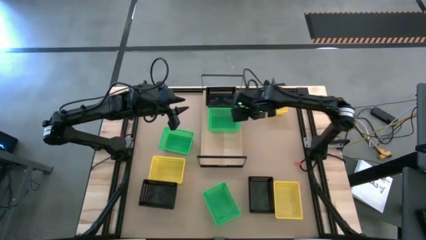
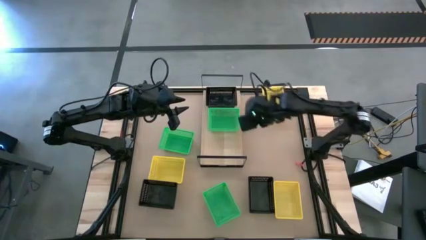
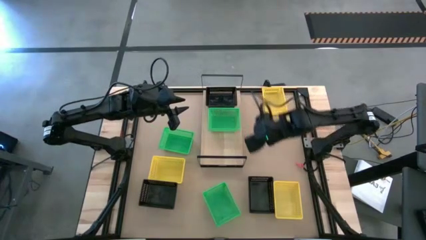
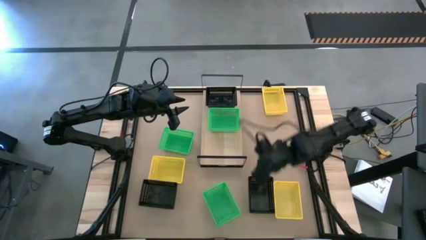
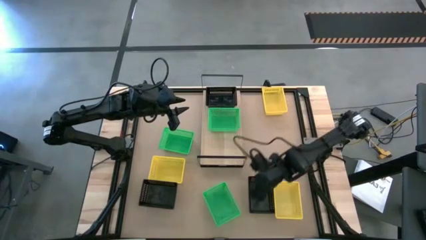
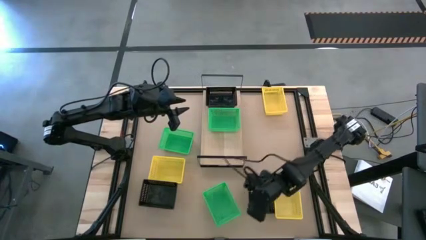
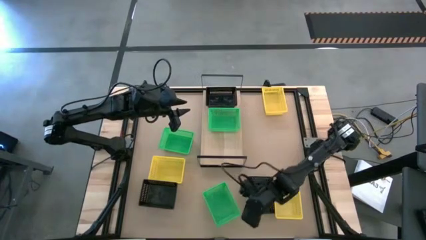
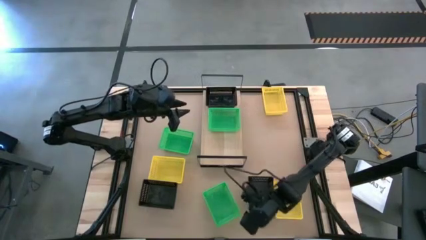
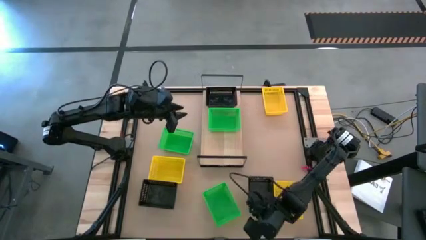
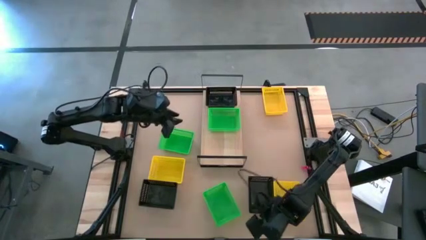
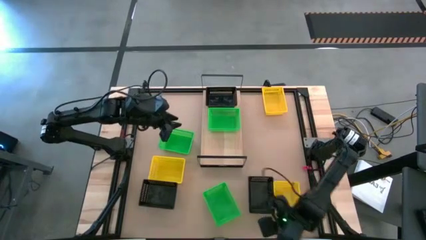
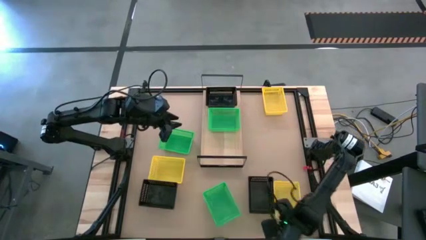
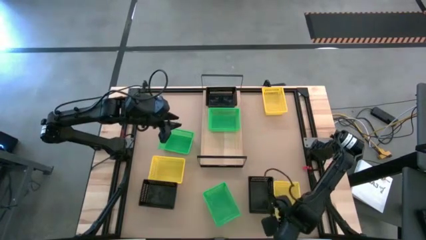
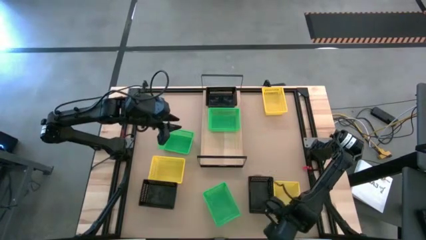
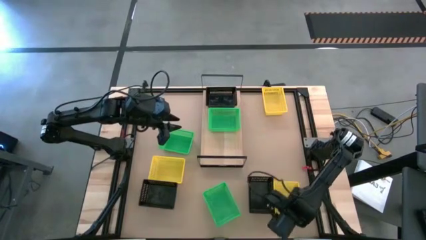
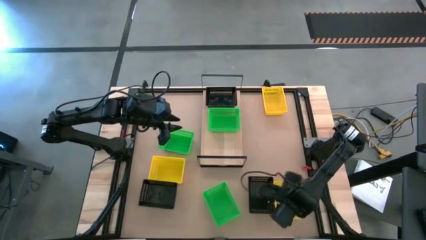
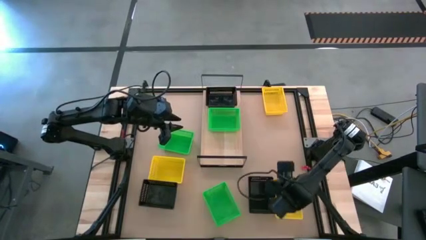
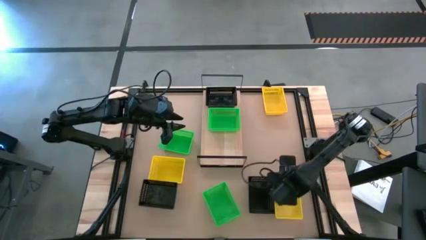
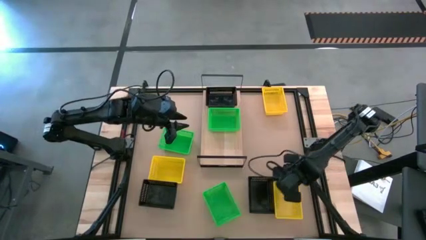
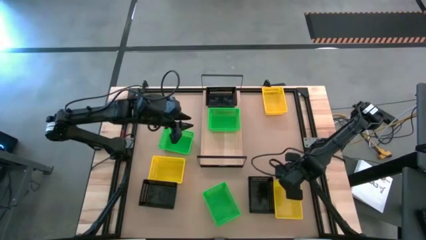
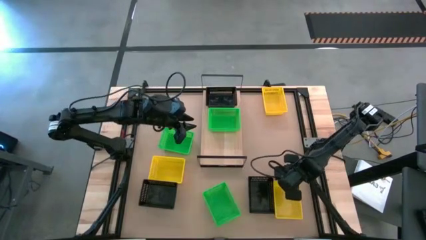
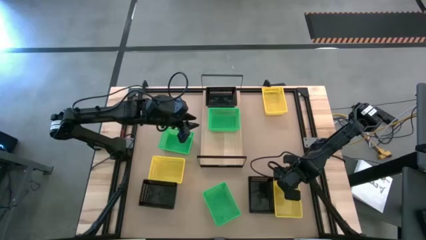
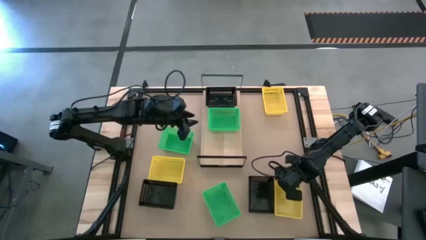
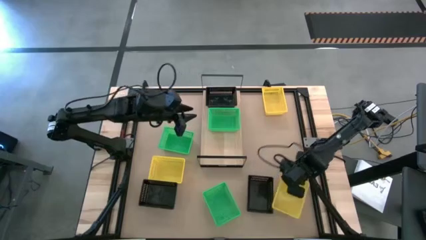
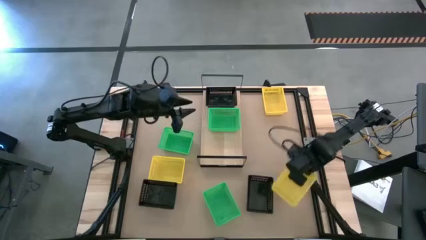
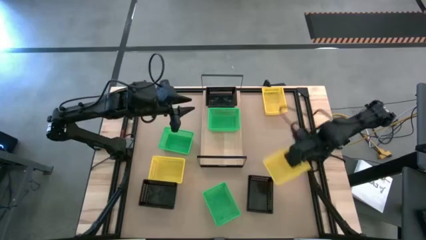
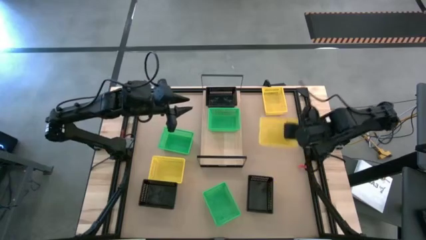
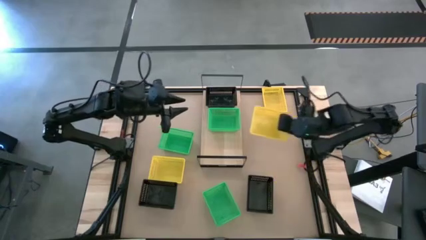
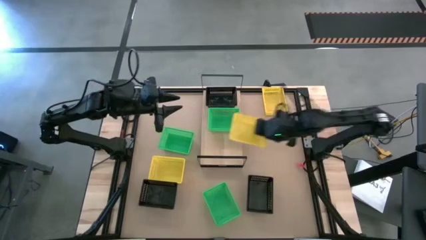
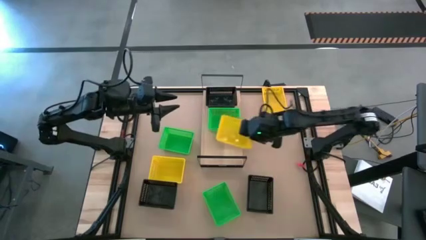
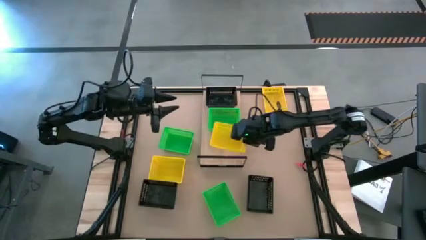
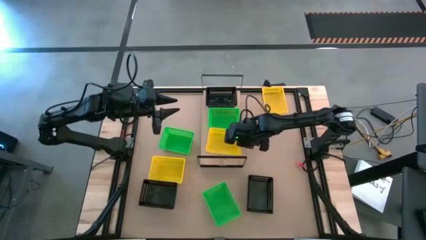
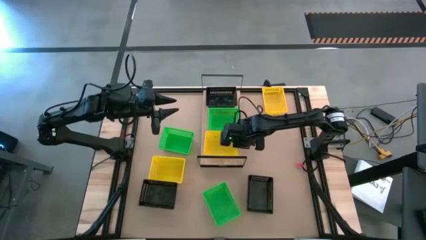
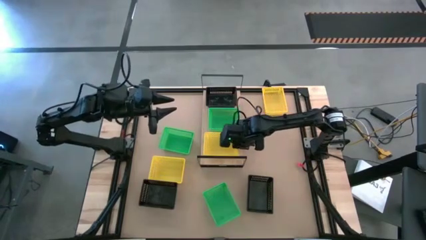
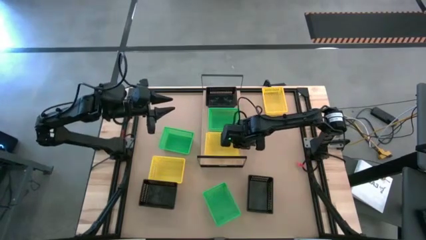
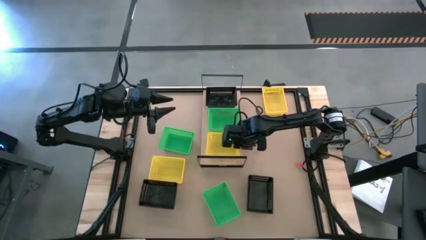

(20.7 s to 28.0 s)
Task: Stack baskets on shelf by color
Put the bottom right yellow bin on the shelf

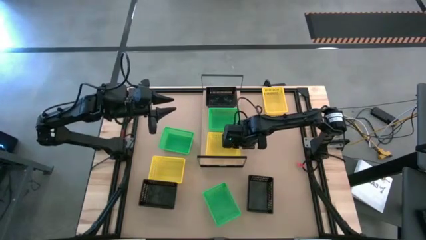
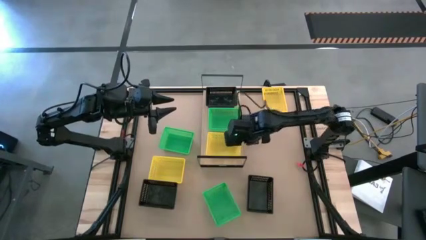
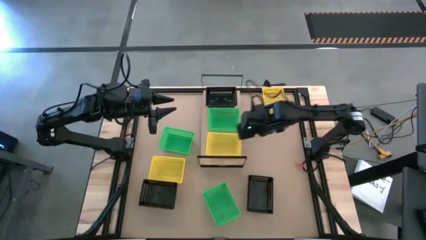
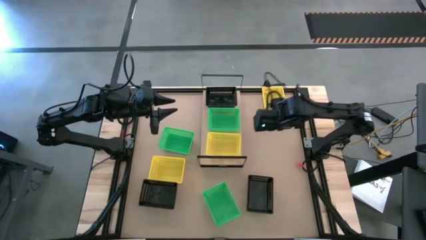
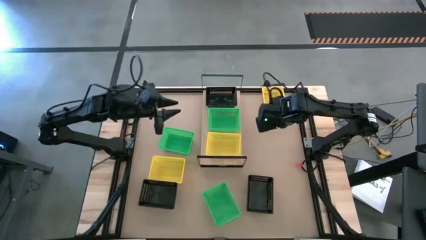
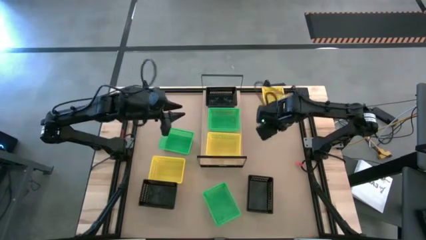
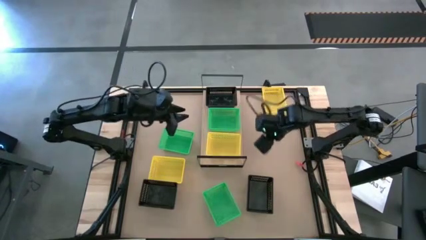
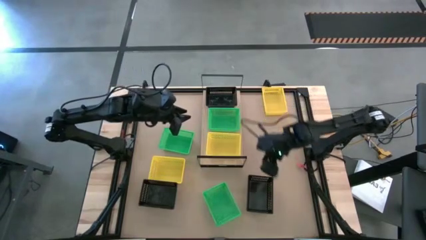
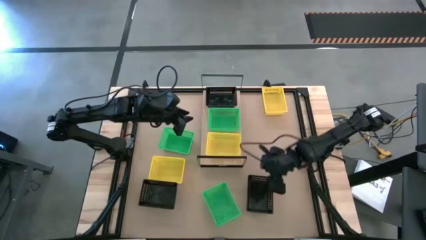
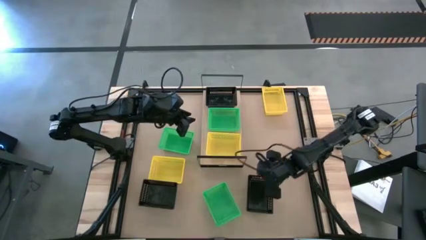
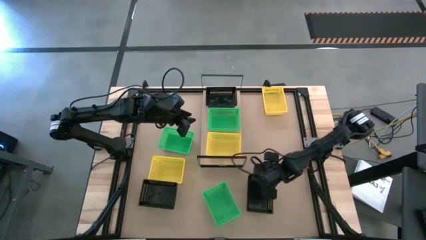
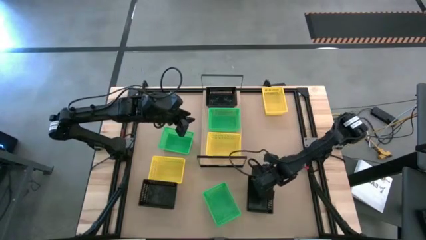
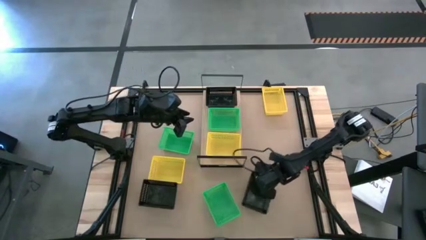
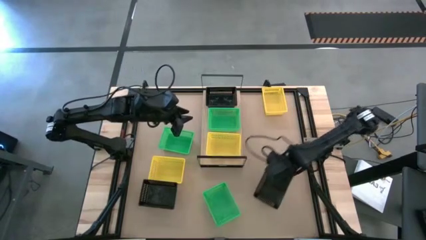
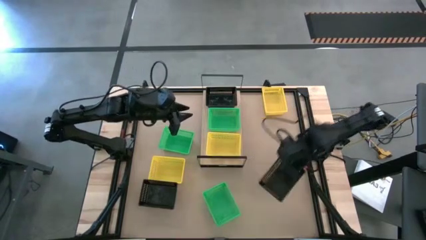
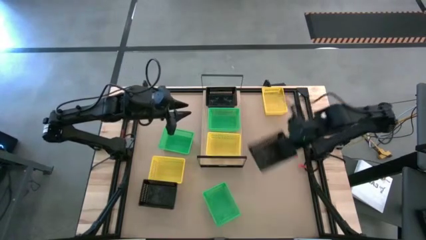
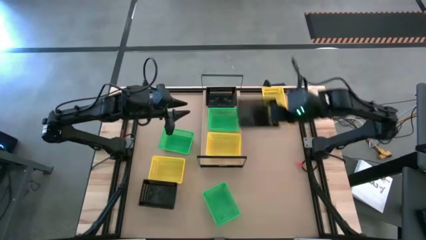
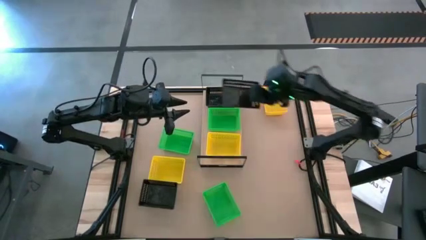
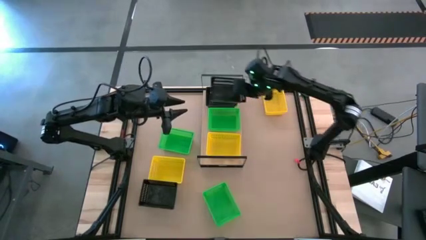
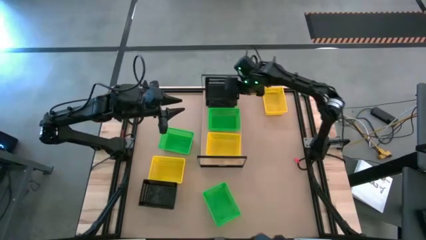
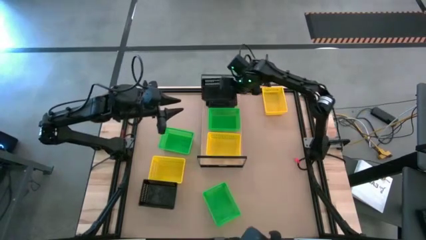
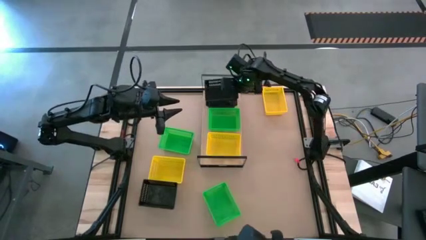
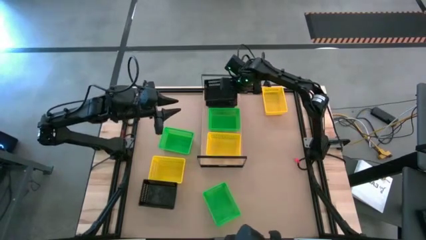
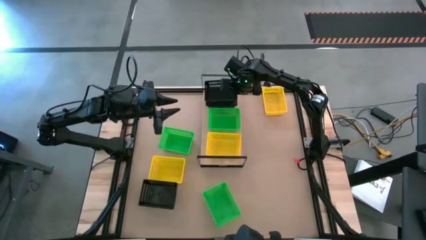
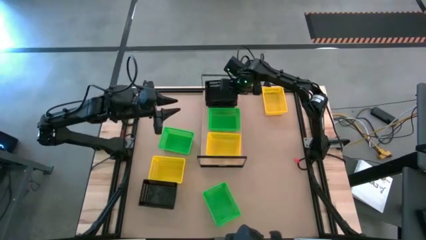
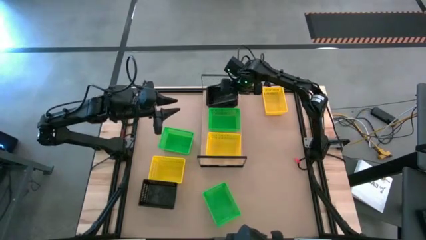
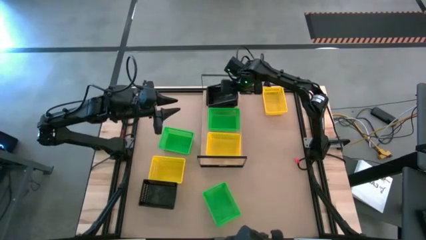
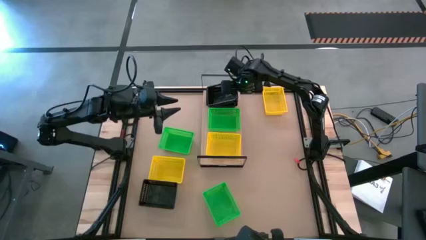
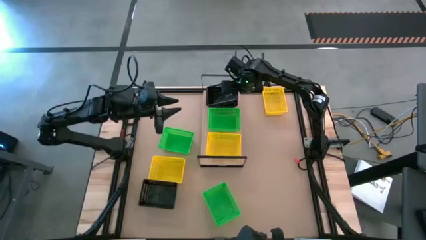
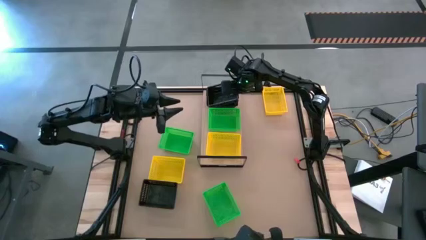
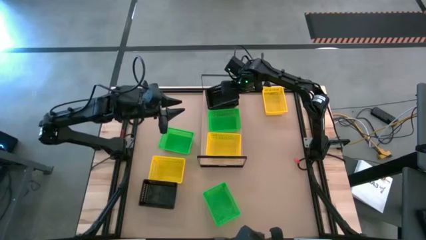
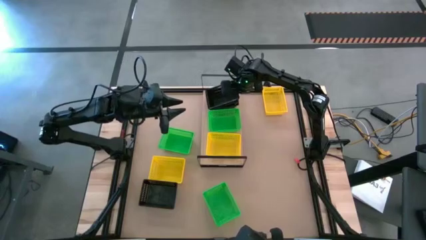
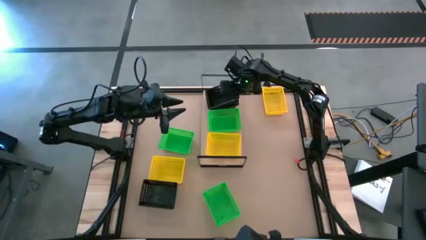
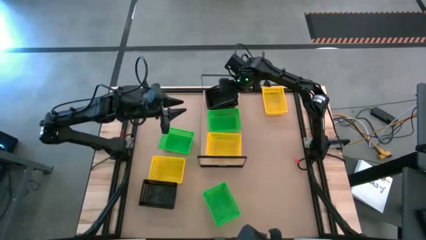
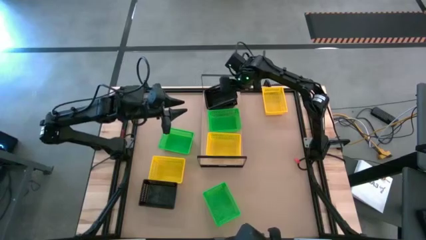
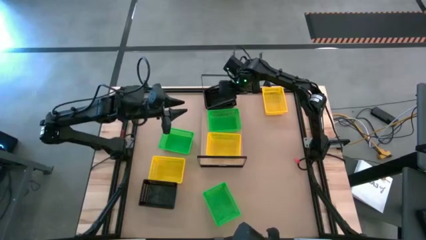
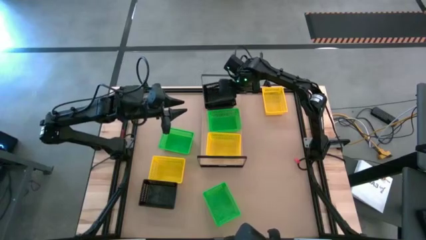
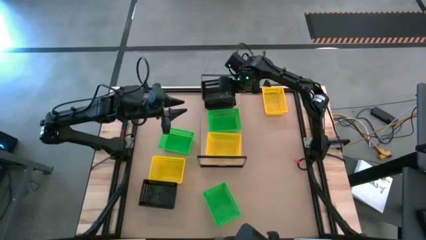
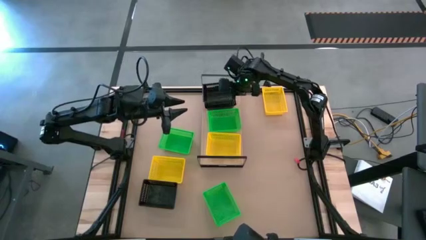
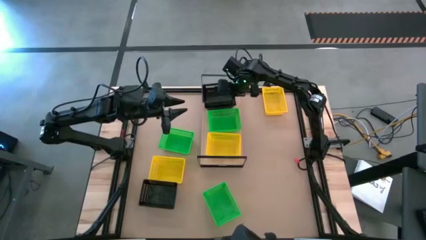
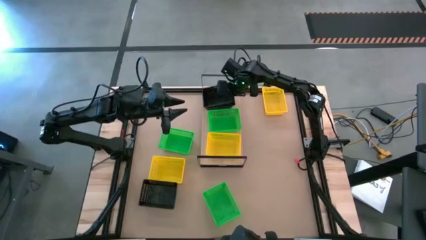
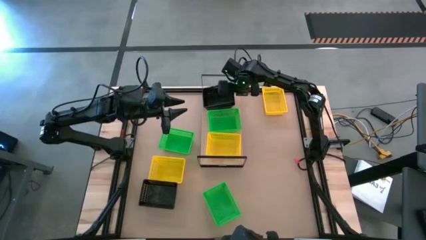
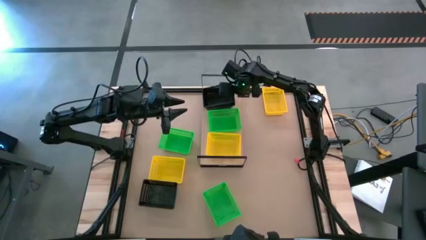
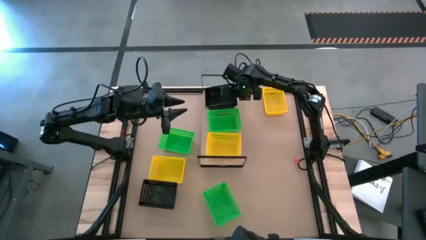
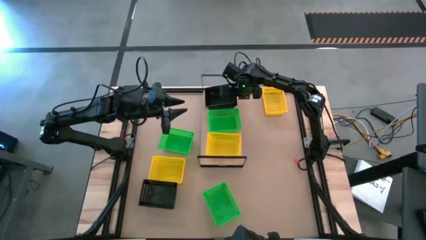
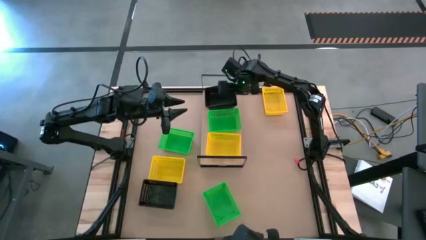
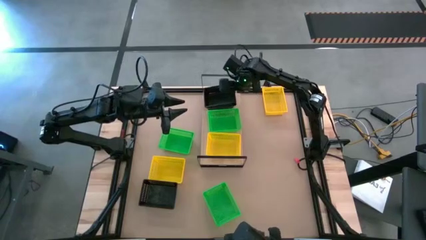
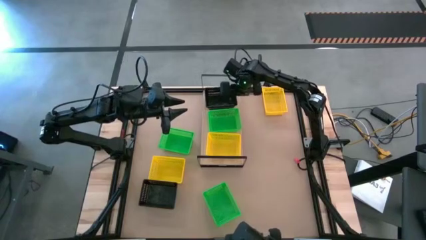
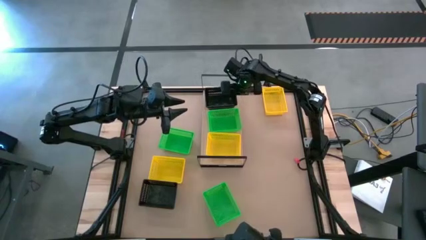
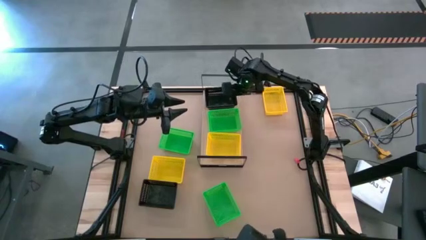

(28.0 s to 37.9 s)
Stack the right black bin on top of the black bin on the shelf
